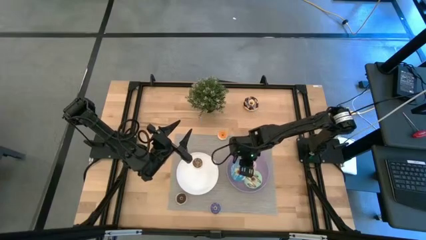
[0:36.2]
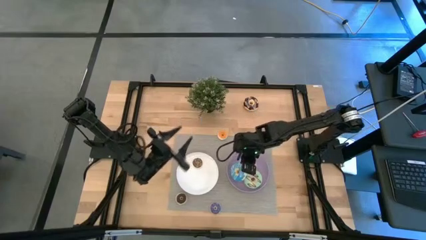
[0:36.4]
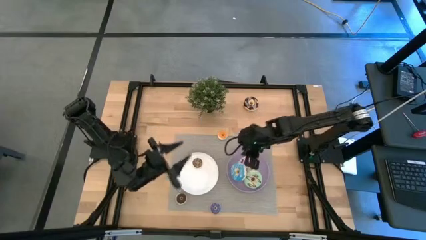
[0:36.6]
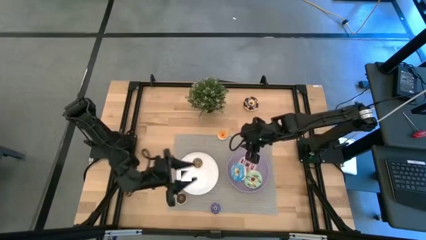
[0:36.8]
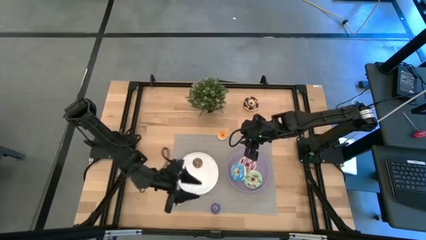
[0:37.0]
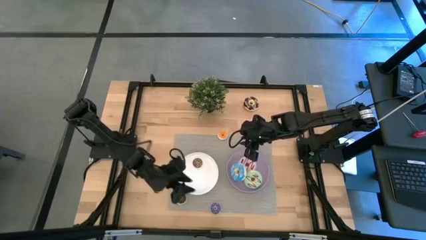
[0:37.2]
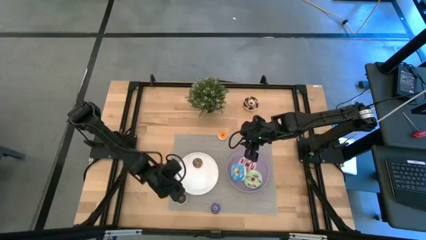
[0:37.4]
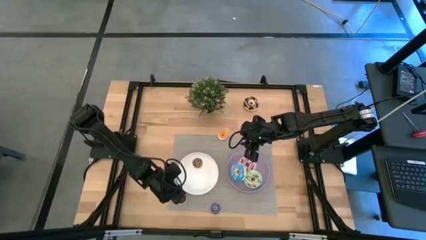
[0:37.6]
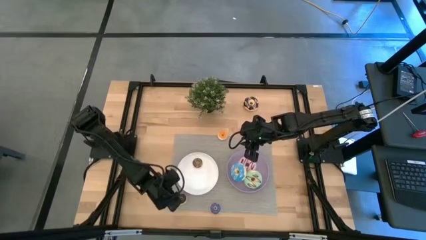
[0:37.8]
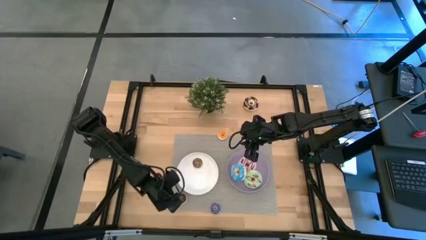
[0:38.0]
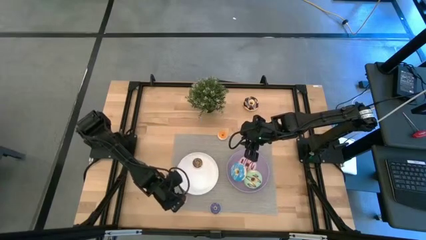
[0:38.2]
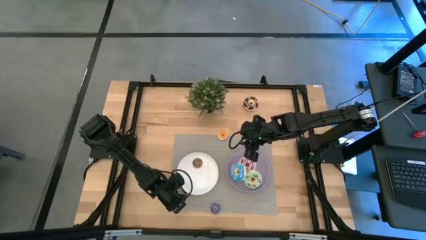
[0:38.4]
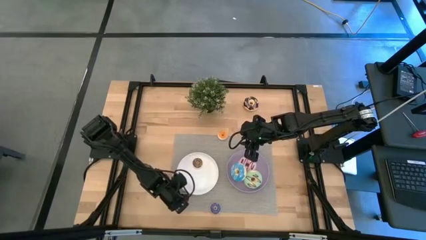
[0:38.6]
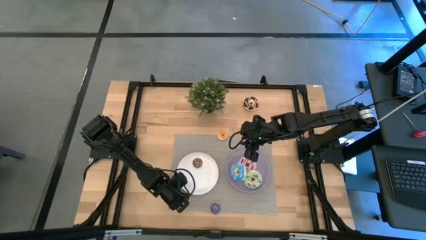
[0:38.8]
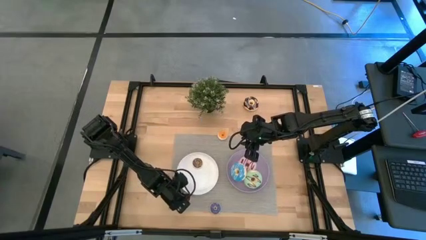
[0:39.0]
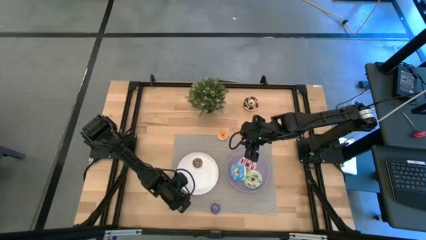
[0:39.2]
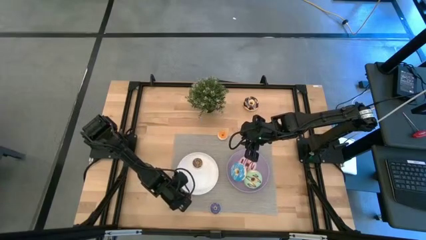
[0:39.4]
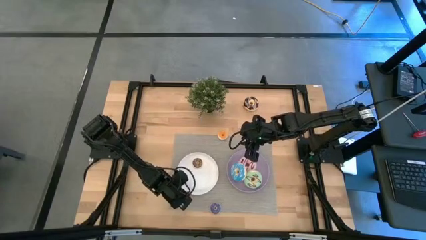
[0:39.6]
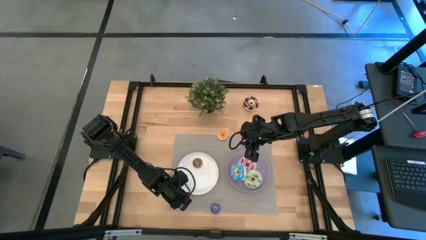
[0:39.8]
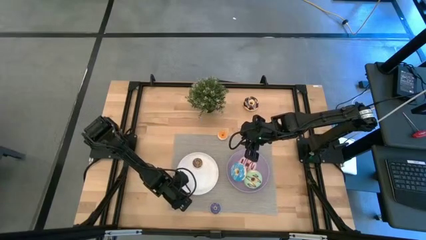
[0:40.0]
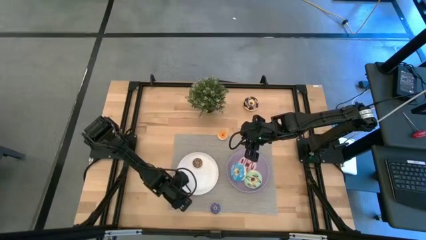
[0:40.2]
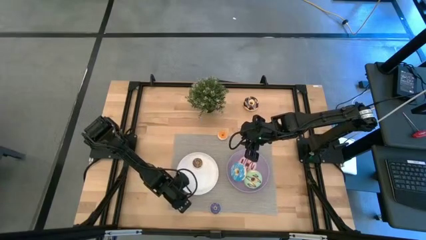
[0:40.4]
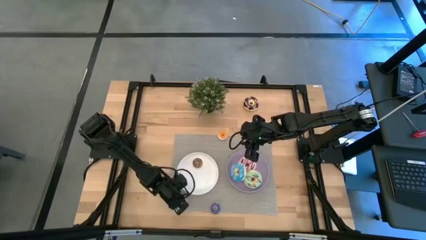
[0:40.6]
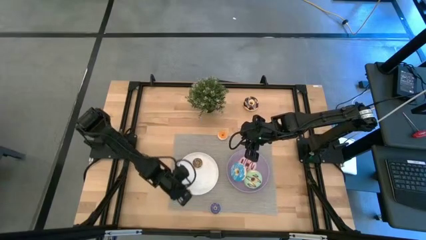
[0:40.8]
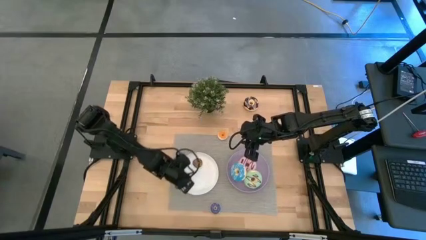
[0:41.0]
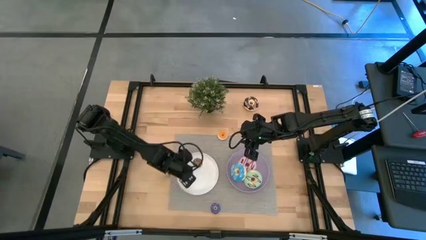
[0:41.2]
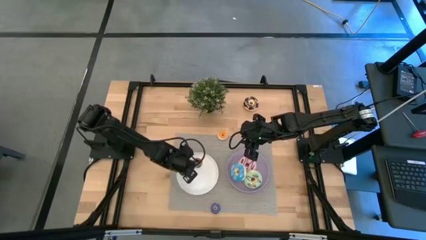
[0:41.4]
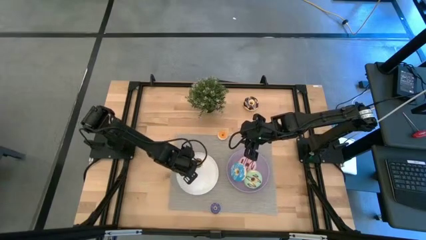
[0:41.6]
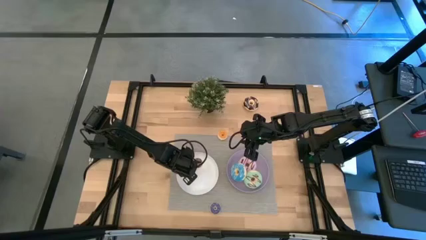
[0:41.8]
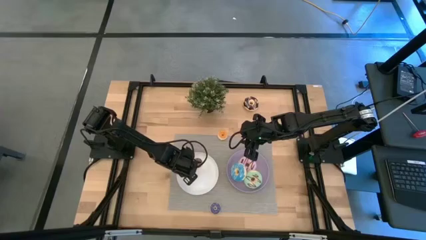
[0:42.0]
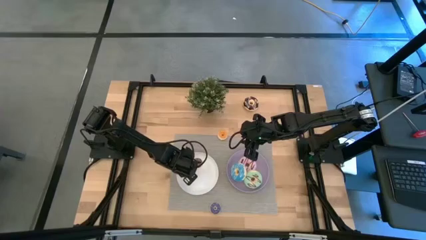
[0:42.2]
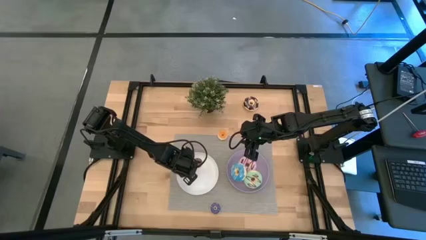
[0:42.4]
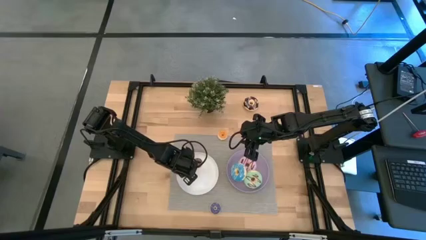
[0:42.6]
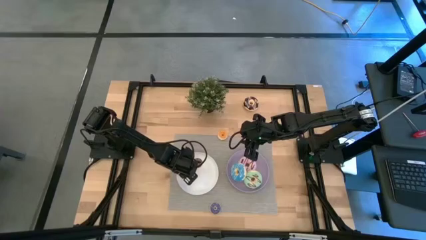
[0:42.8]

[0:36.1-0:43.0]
Task: Pick & Place donuts
Put the small dark brown donut on the white plate

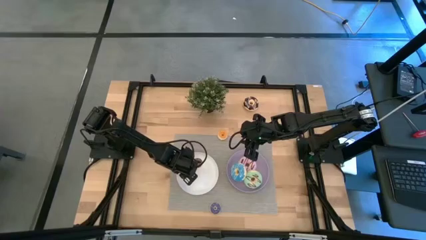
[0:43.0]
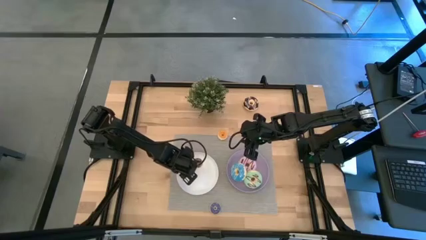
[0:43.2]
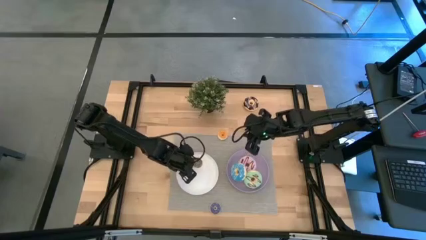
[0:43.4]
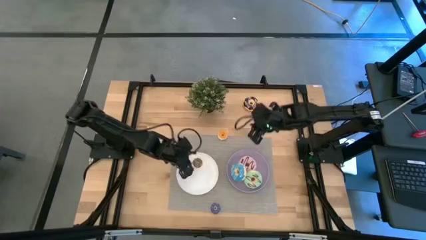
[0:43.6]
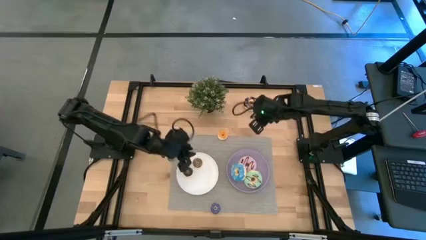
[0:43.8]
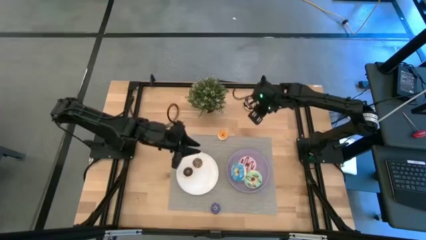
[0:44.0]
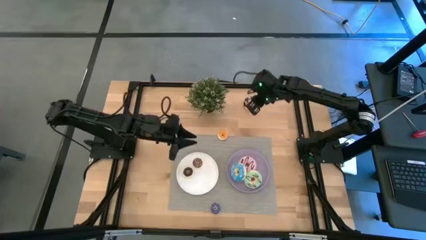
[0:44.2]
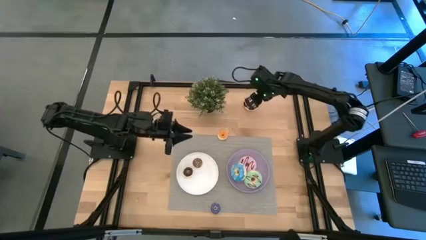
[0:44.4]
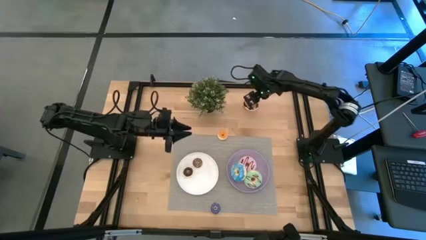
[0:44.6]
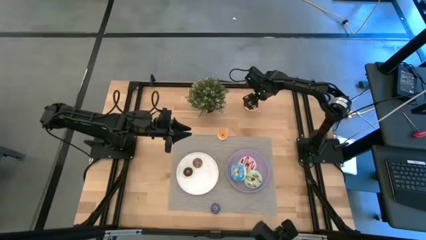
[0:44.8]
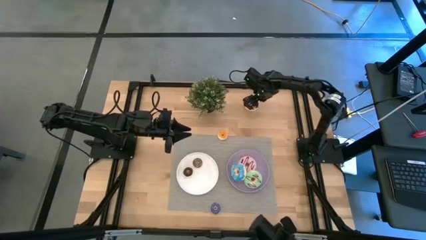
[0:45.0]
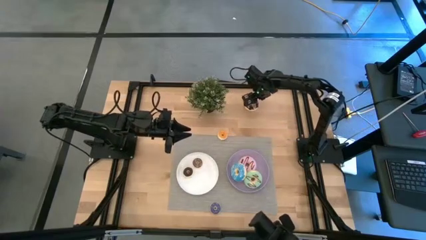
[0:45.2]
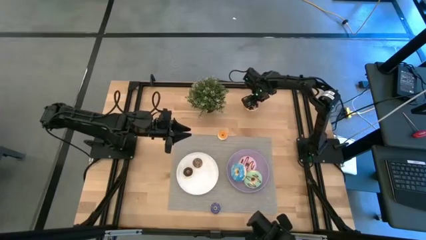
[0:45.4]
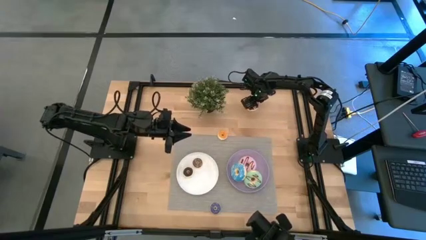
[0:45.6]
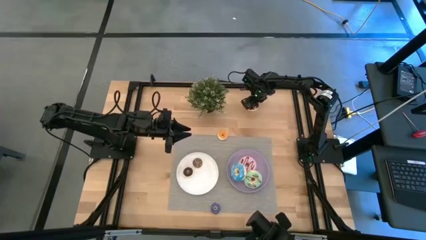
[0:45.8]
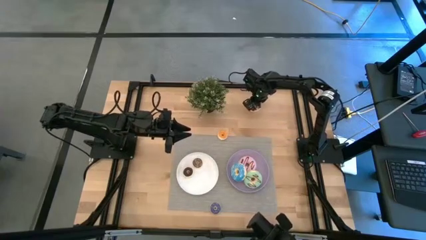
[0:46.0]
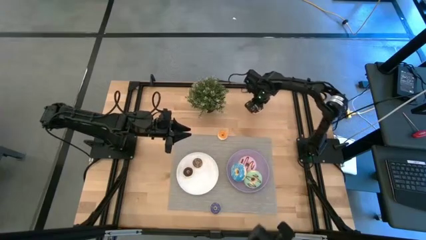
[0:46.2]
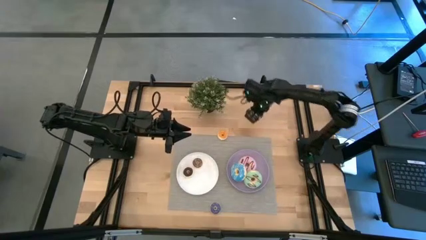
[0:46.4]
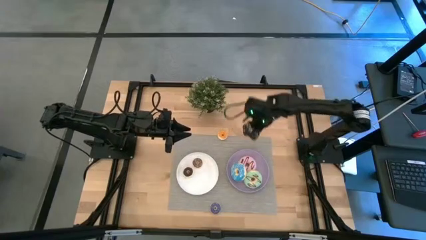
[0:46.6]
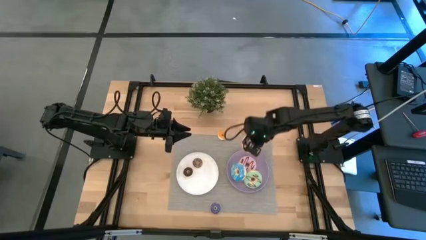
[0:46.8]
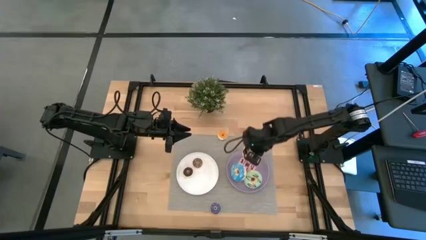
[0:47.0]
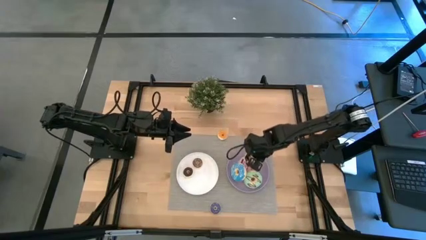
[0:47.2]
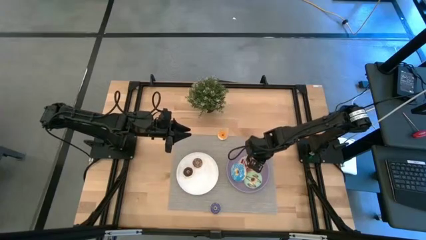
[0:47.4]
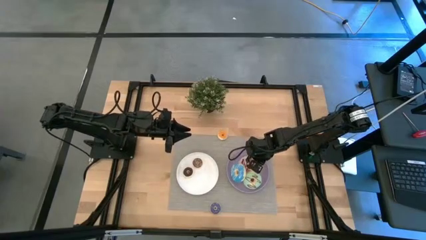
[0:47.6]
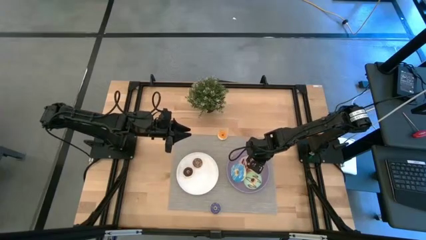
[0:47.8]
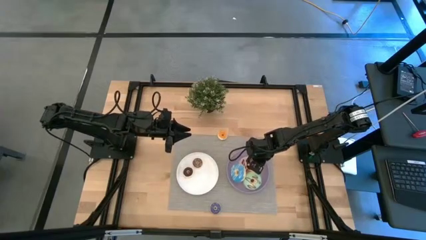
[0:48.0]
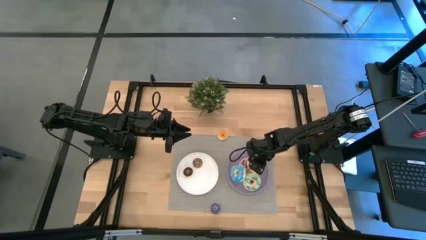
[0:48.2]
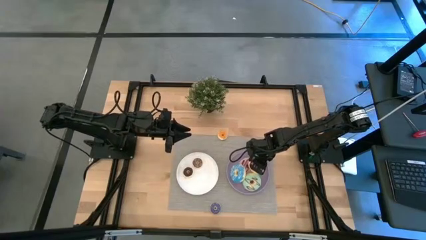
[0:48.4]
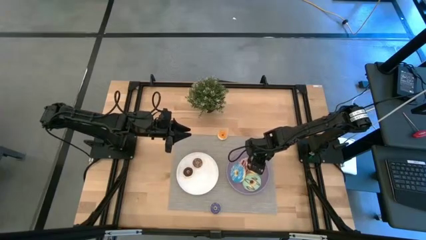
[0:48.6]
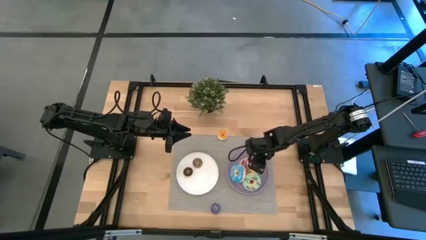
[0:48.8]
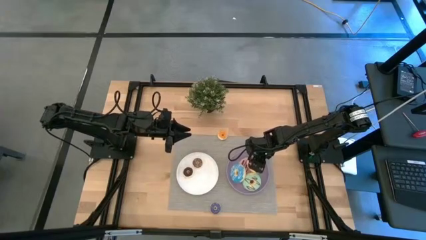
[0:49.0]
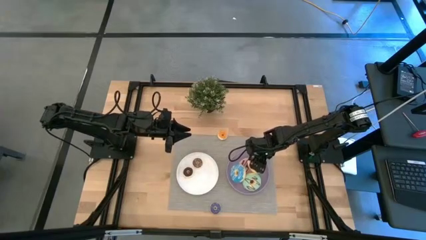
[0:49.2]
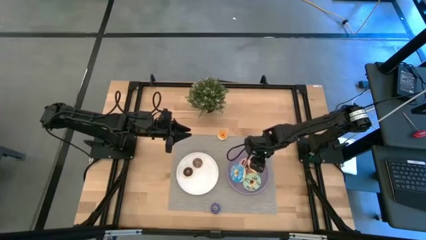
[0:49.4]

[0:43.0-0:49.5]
Put the big black donut on the purple plate

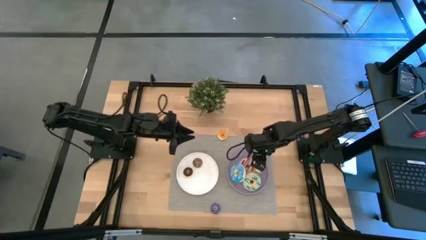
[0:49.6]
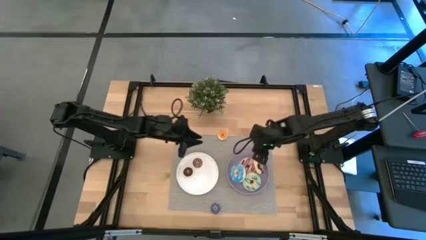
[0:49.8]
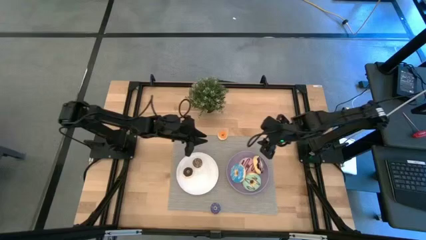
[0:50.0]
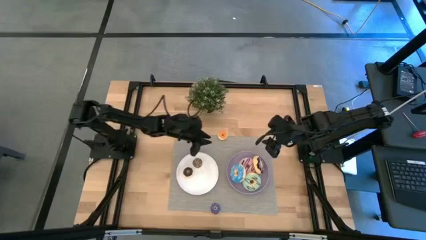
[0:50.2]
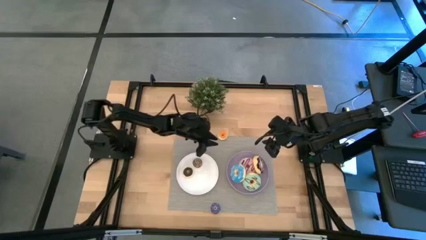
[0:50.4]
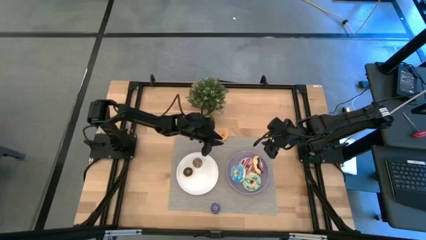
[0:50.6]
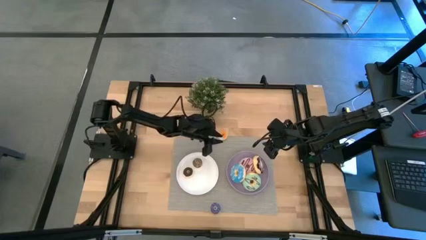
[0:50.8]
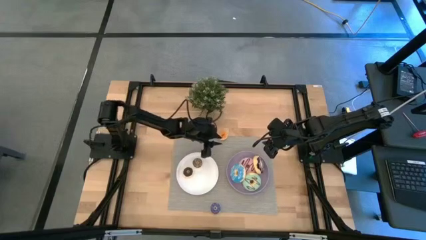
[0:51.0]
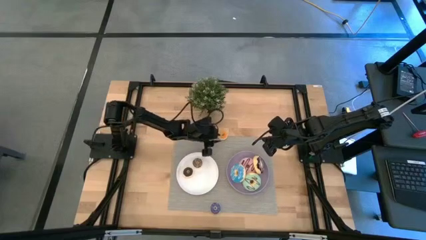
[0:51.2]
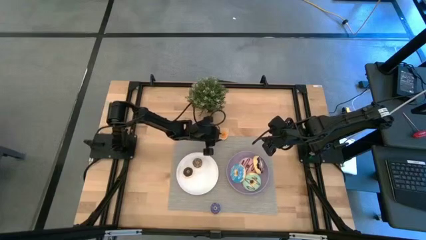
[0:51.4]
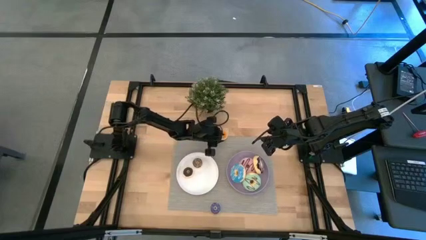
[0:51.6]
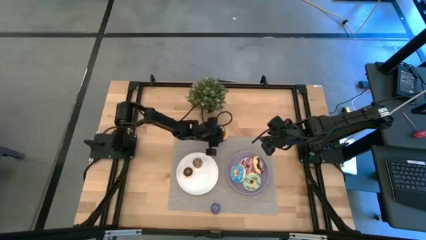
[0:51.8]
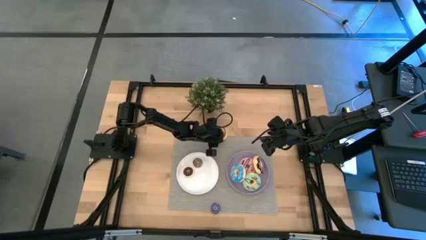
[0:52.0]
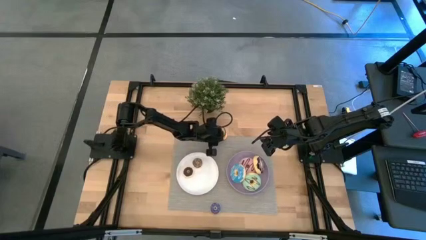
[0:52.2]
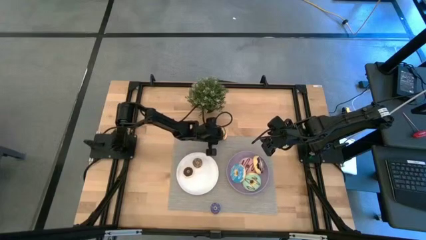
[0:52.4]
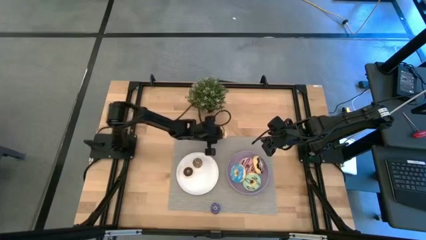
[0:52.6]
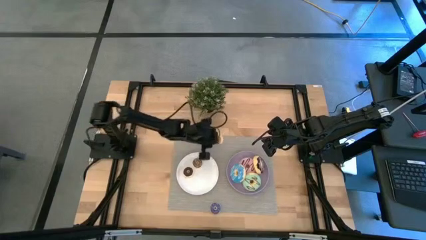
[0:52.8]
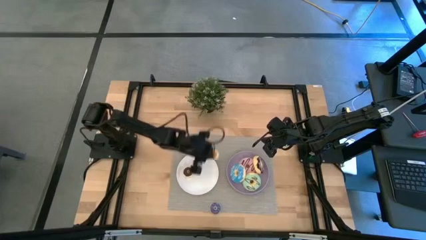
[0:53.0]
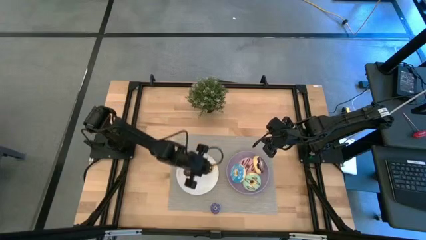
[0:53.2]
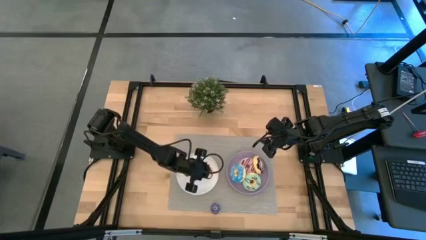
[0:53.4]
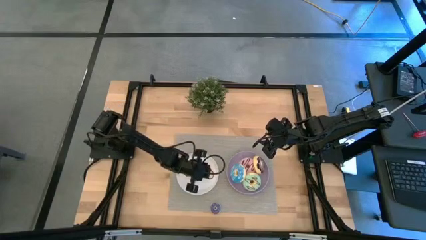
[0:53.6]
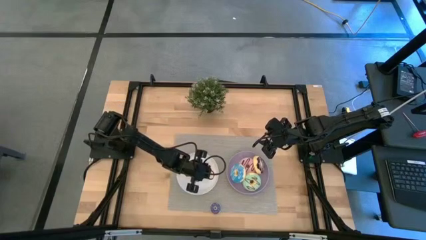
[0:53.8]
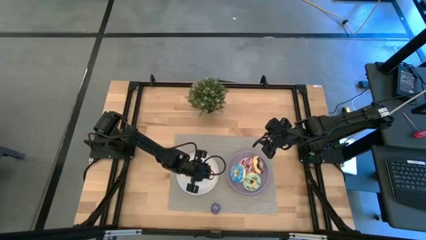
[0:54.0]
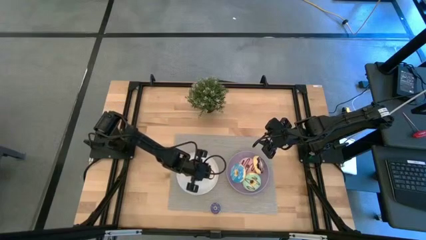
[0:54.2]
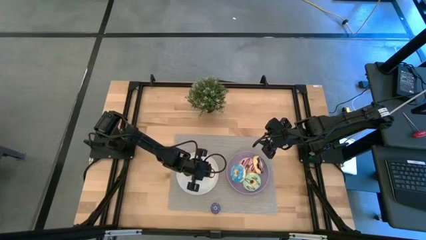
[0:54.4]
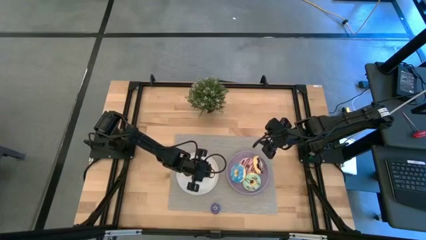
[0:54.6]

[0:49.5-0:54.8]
Put the small yellow donut on the white plate
